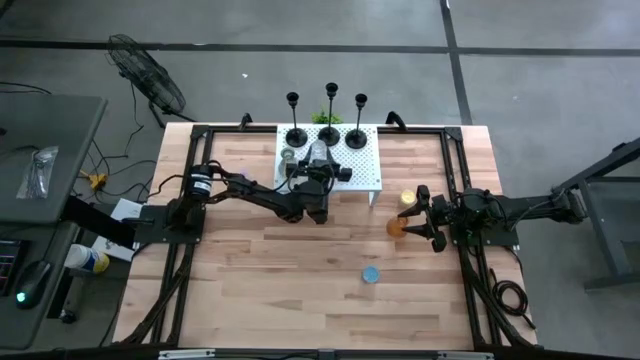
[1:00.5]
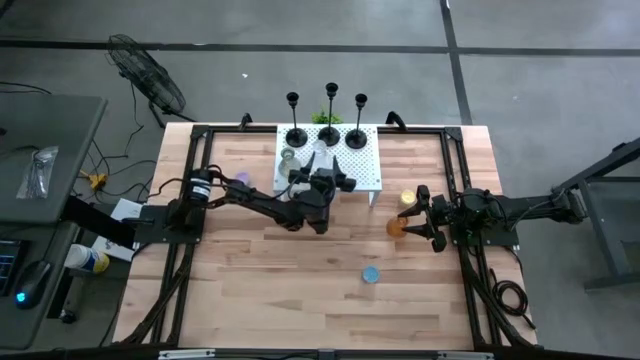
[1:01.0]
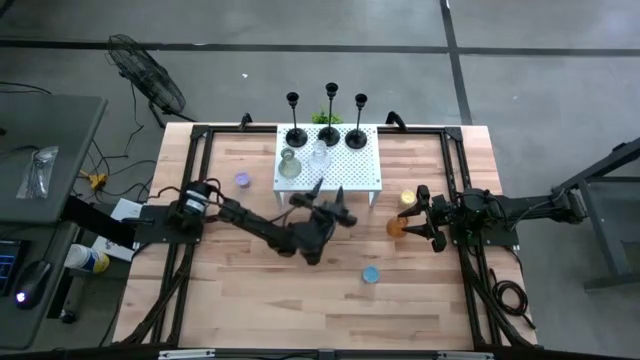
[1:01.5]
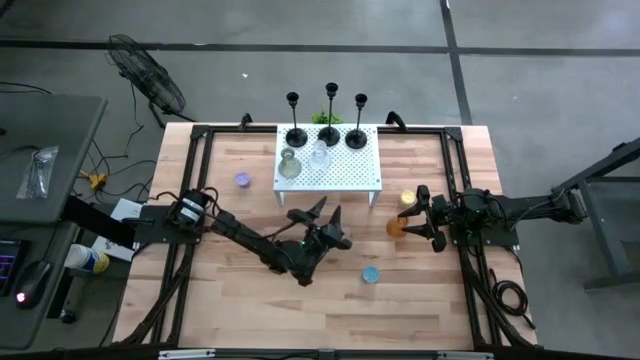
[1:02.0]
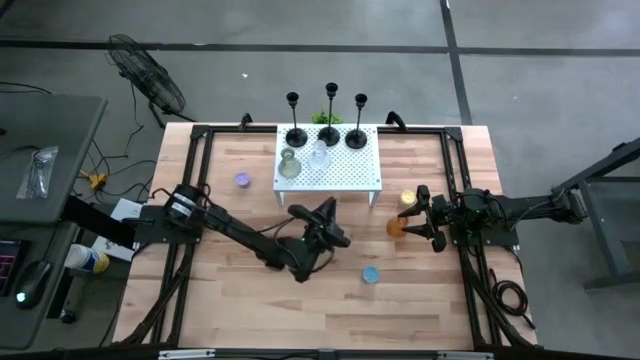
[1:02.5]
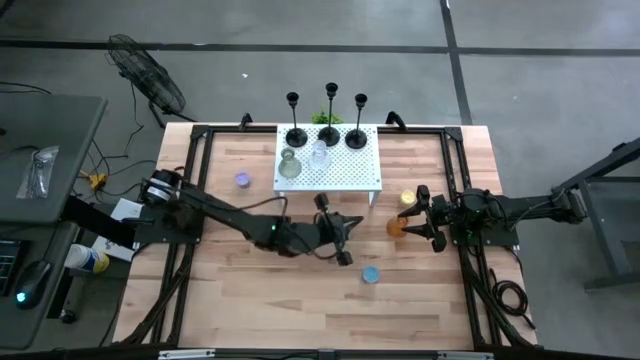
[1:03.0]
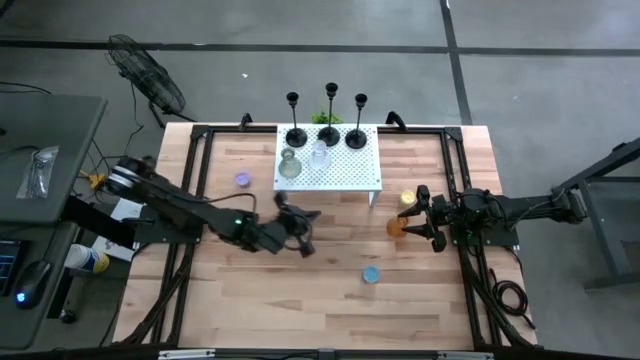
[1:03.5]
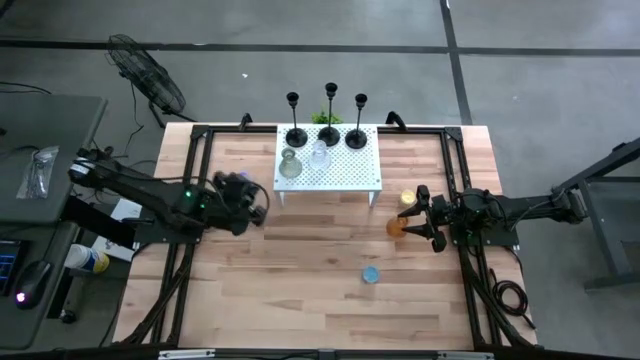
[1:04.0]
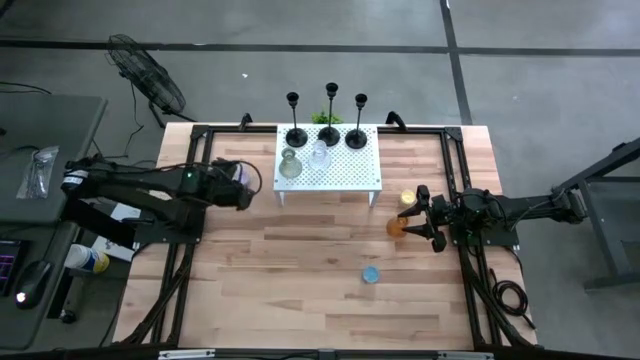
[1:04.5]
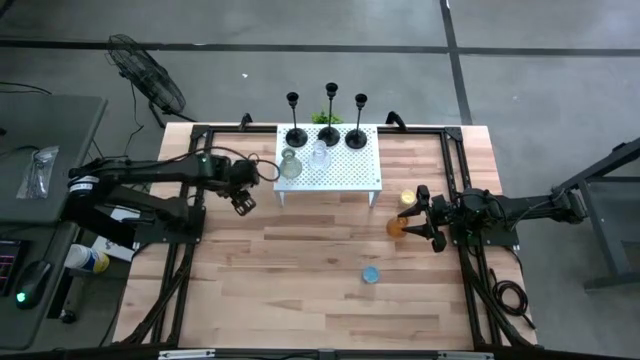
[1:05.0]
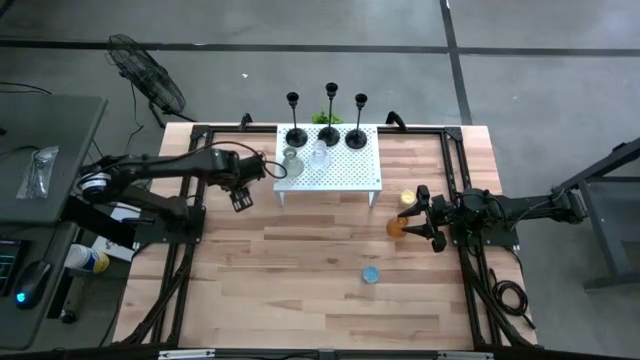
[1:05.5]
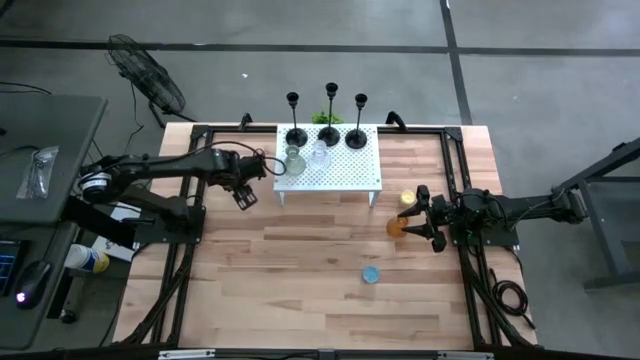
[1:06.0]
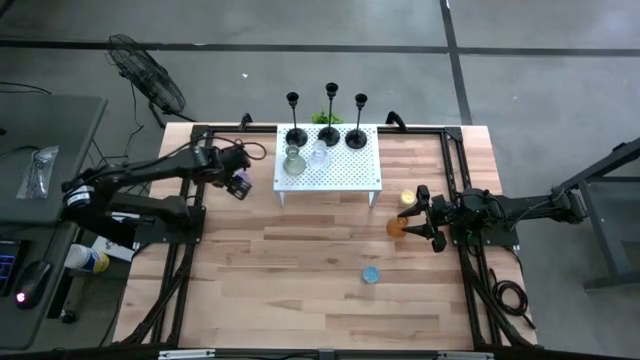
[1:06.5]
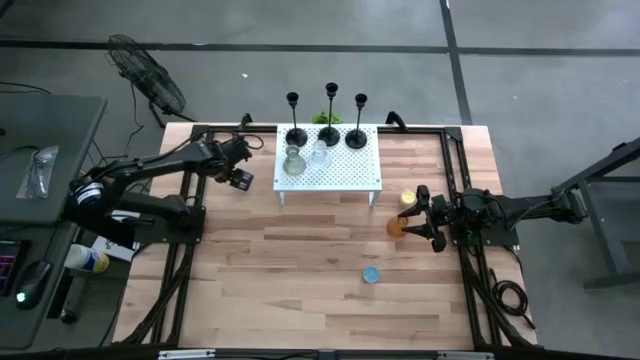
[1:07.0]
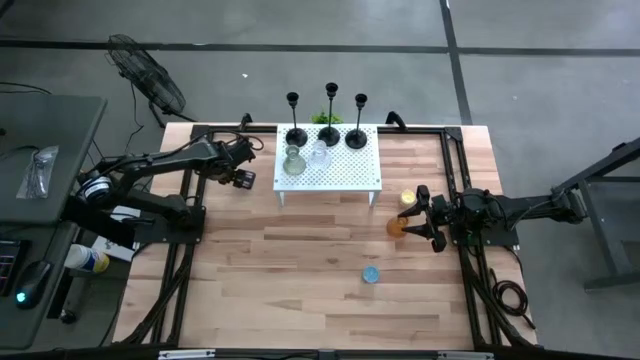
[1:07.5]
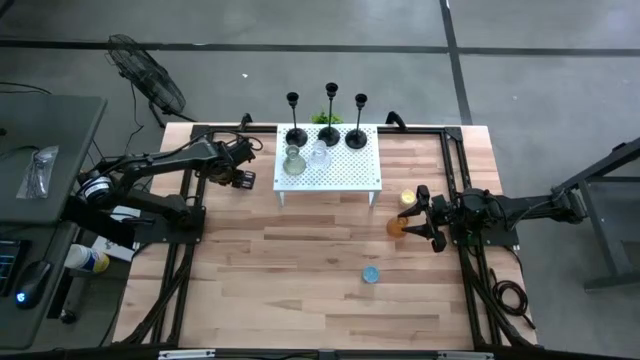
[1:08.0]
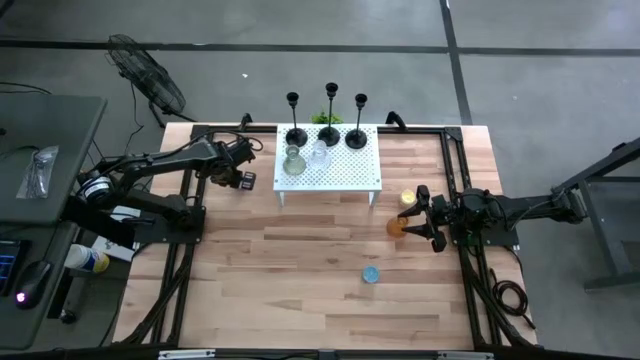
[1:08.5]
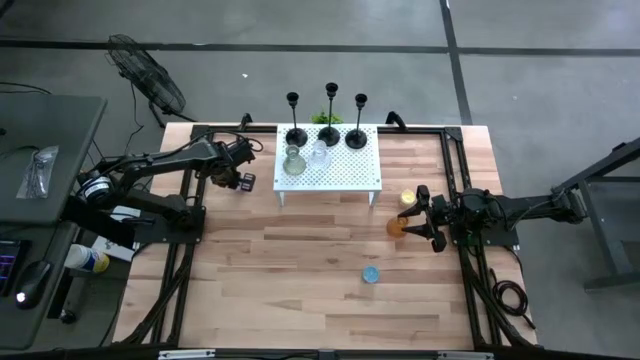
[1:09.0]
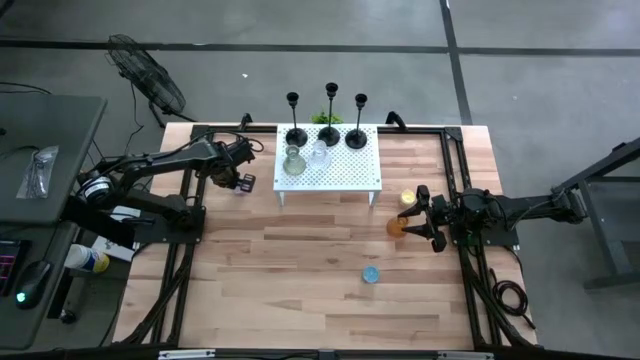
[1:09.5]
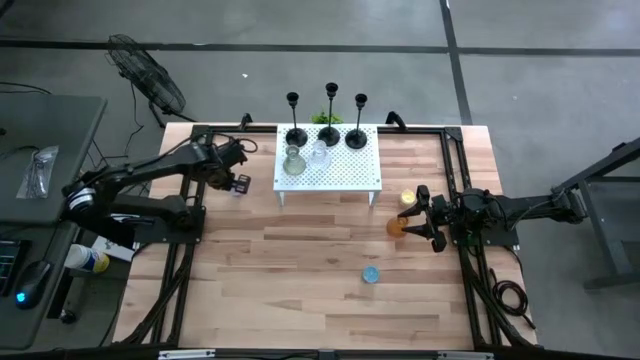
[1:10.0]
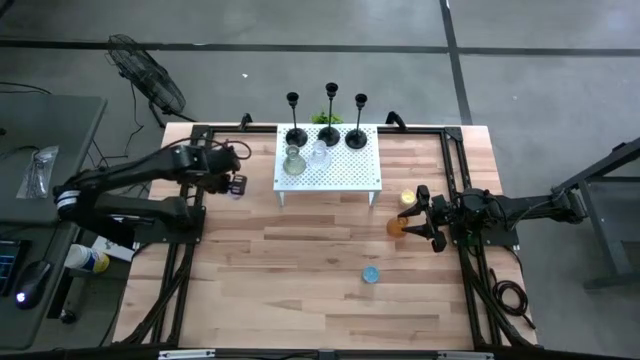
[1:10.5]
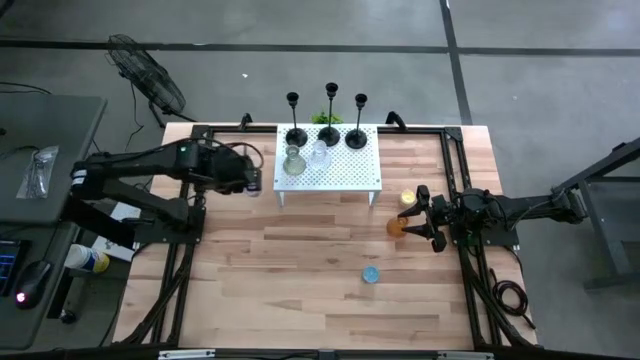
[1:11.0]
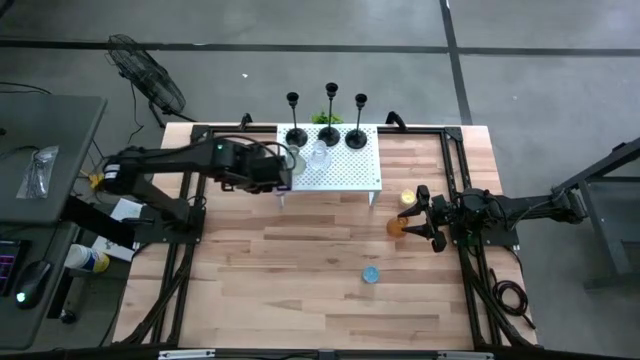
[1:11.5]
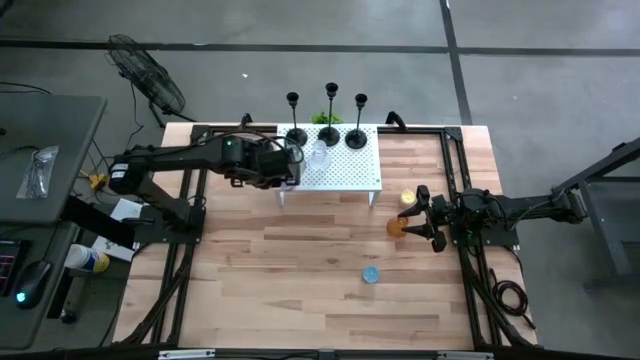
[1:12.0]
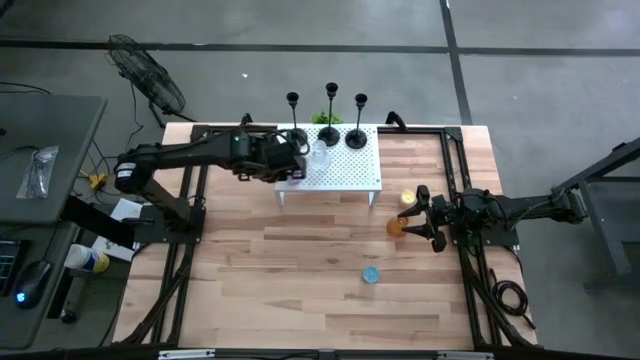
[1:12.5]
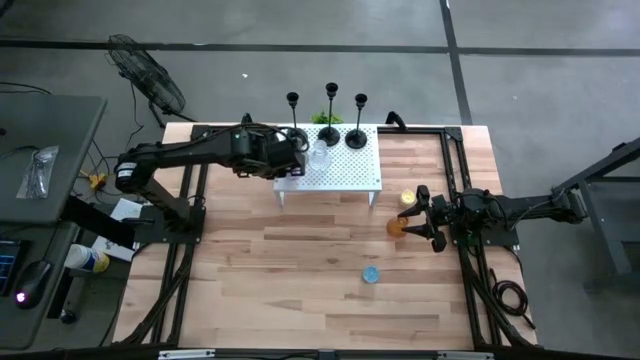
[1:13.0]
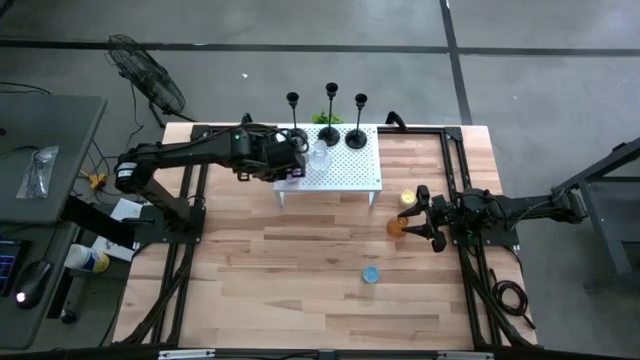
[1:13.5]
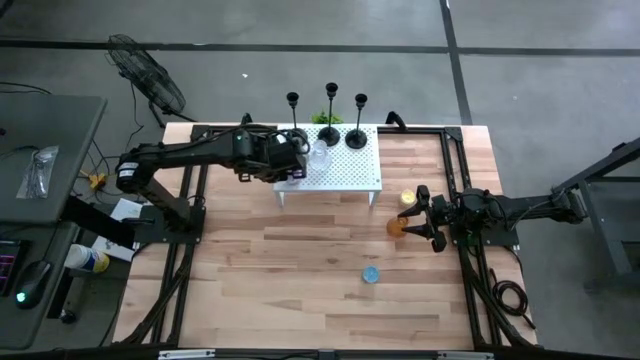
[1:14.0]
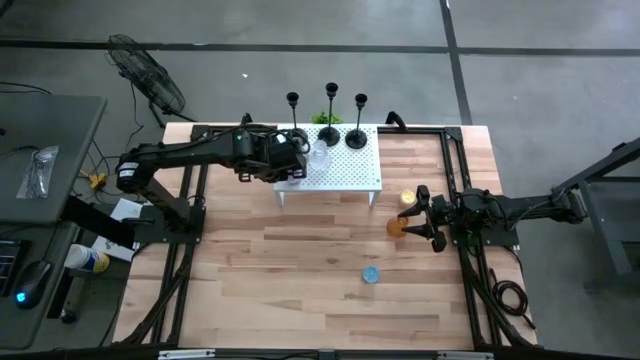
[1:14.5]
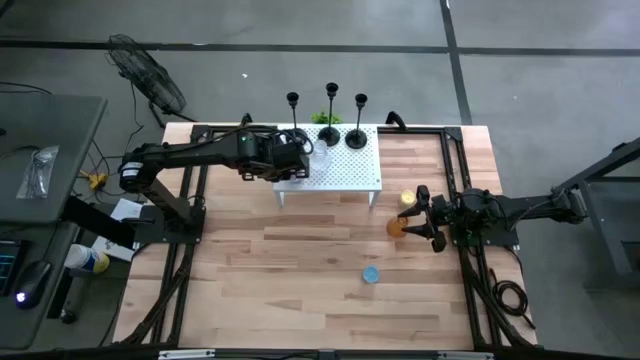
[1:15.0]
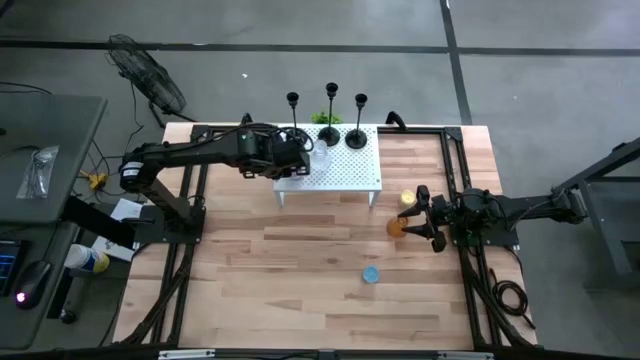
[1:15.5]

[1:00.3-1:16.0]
Task: Pick & Place candle stick holders
Put the purple scented candle on the shelf

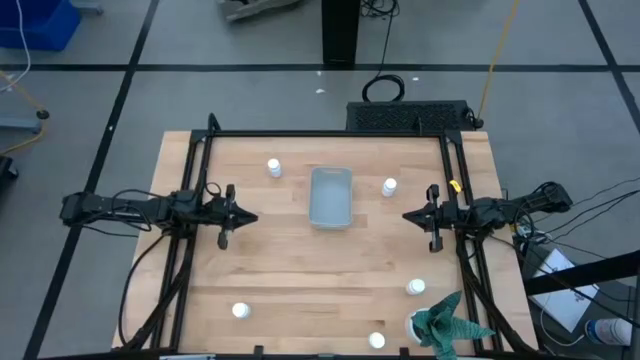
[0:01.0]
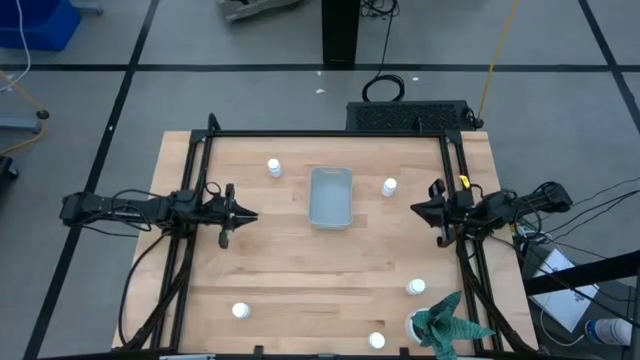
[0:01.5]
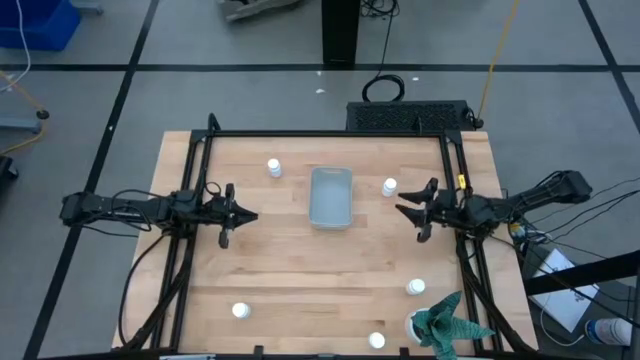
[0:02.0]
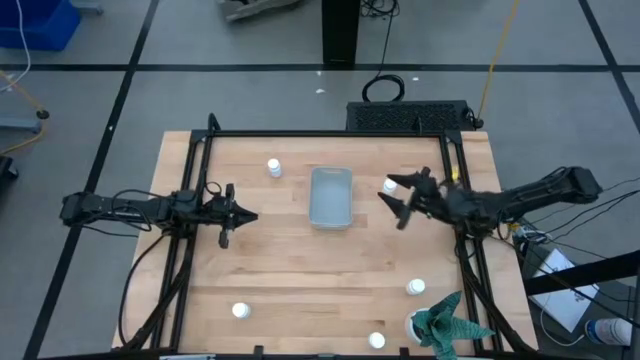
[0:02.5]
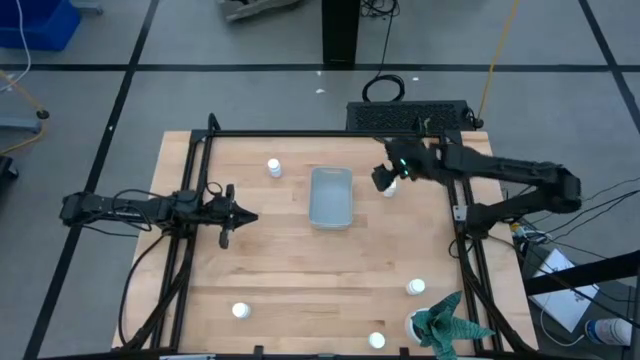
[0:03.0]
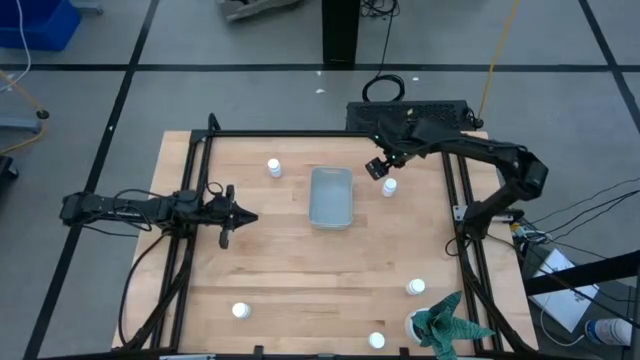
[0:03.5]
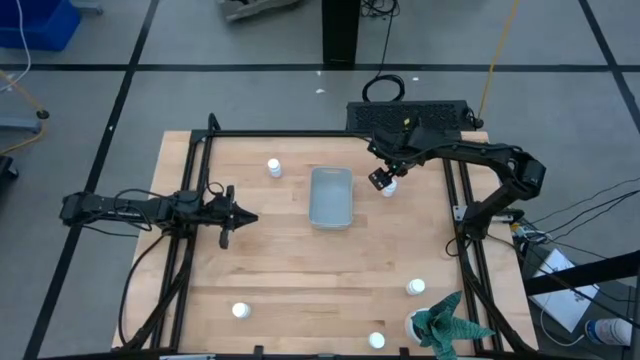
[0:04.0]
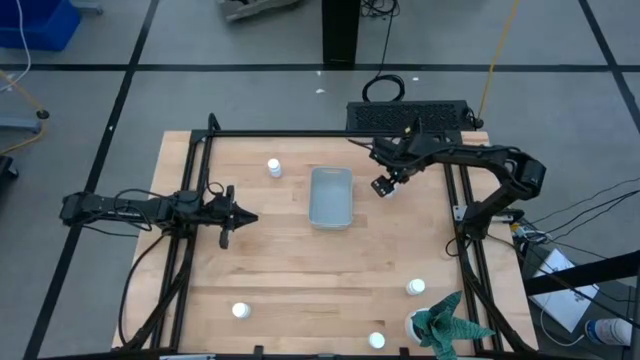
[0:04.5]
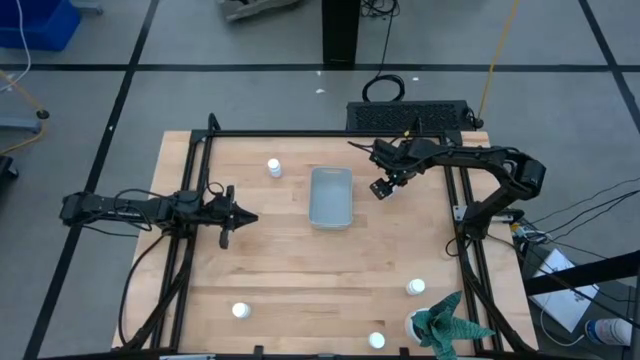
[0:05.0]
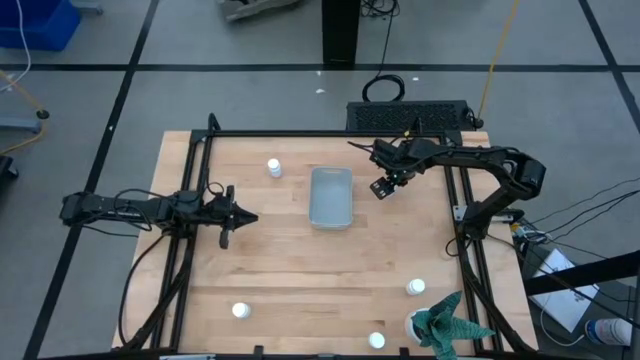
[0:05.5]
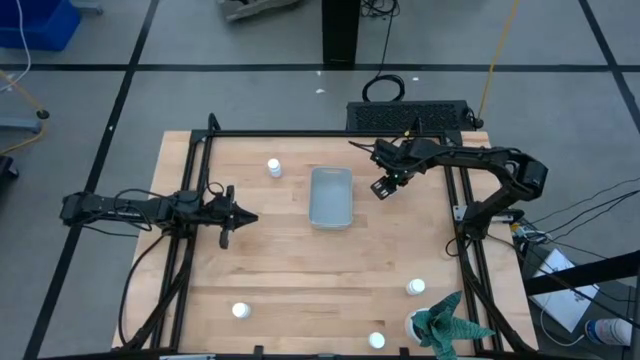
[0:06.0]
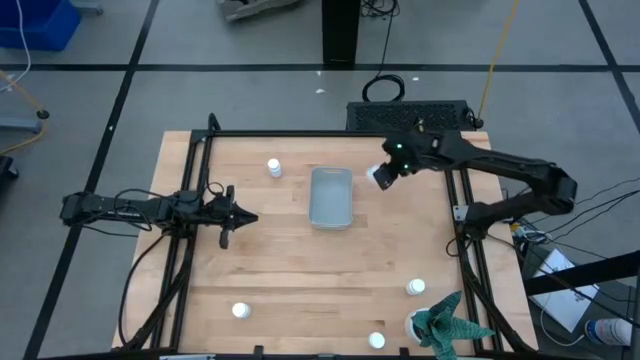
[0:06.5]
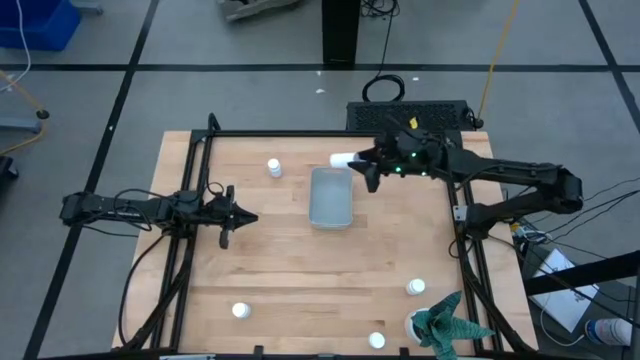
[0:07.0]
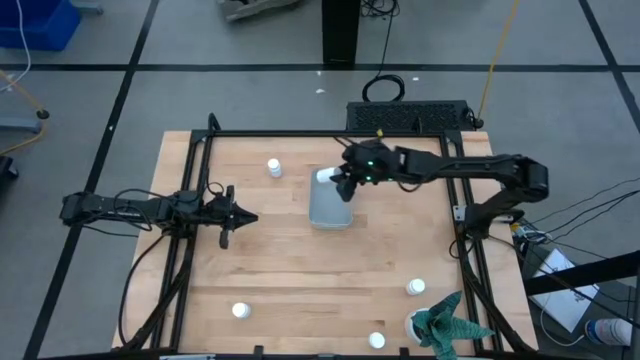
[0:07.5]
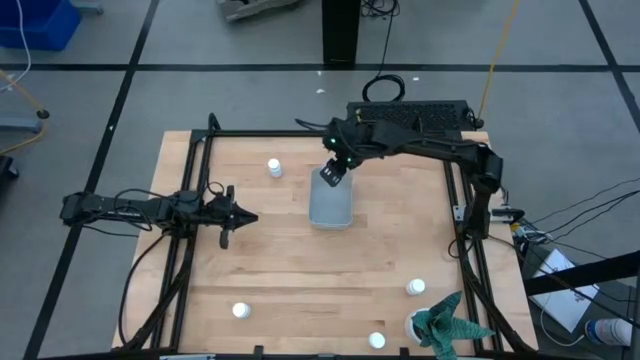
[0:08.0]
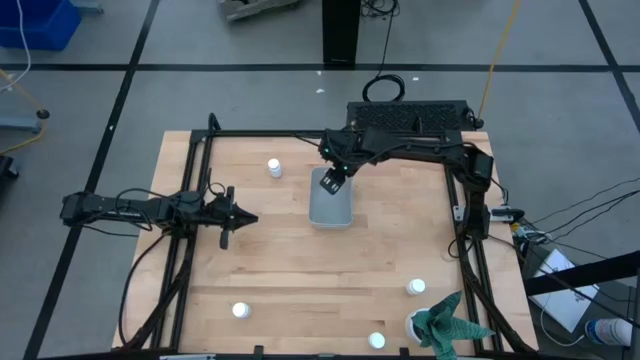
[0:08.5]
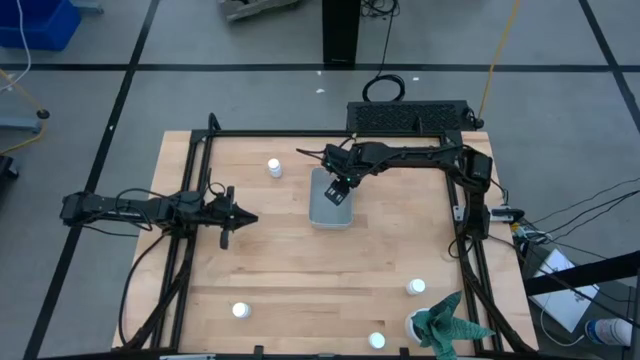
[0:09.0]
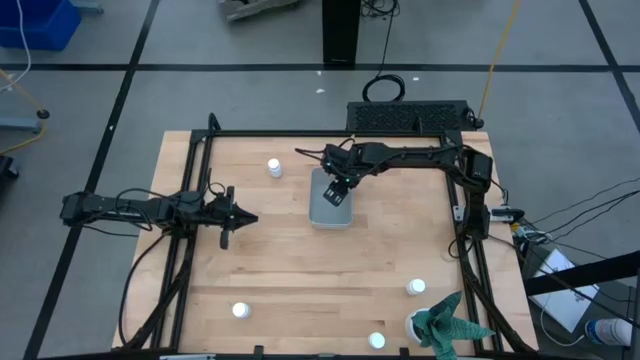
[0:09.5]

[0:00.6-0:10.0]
Task: Pick and place pill bottles into a basket
Put the white pill bottle into the gray bin
